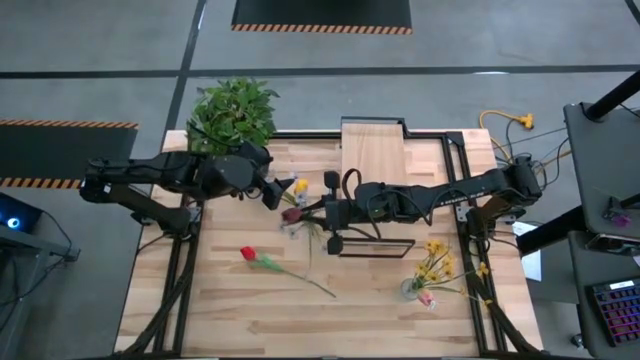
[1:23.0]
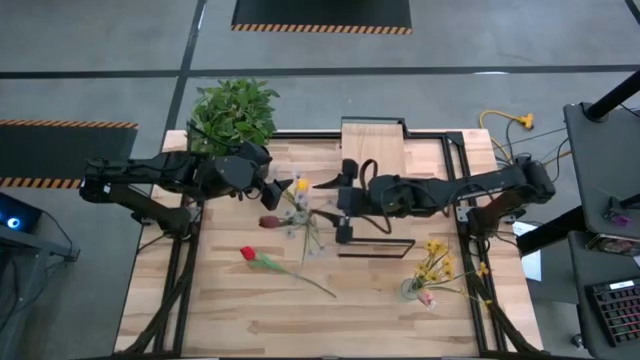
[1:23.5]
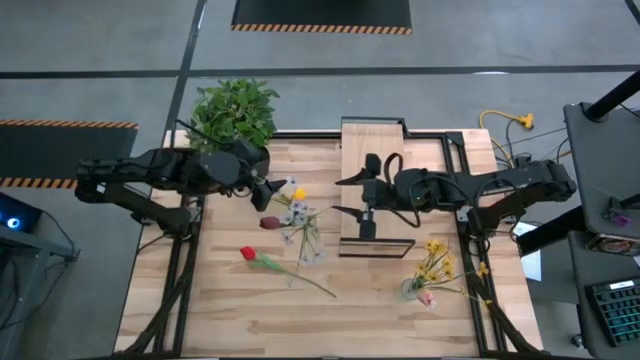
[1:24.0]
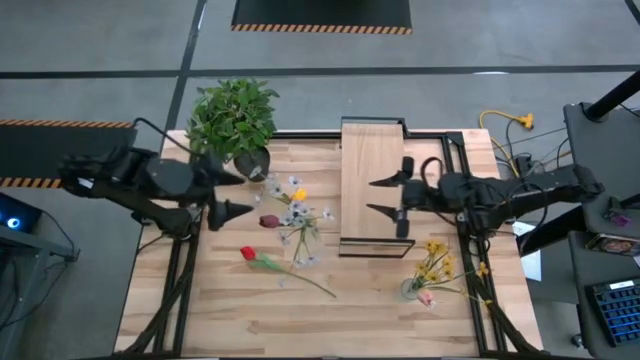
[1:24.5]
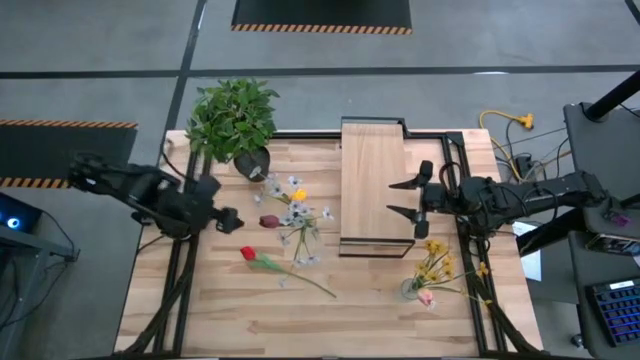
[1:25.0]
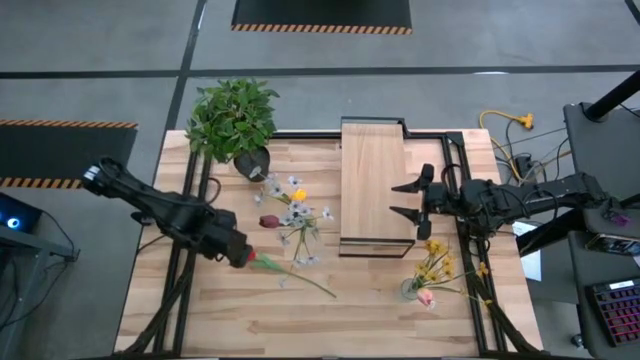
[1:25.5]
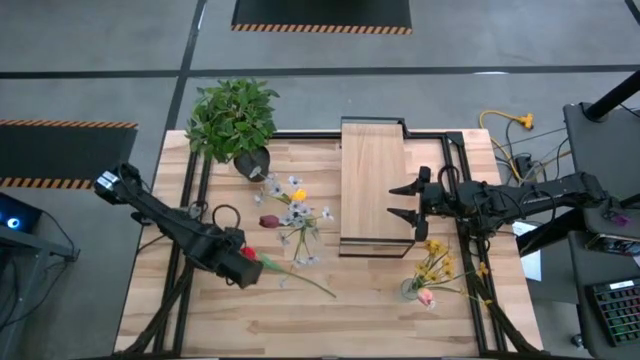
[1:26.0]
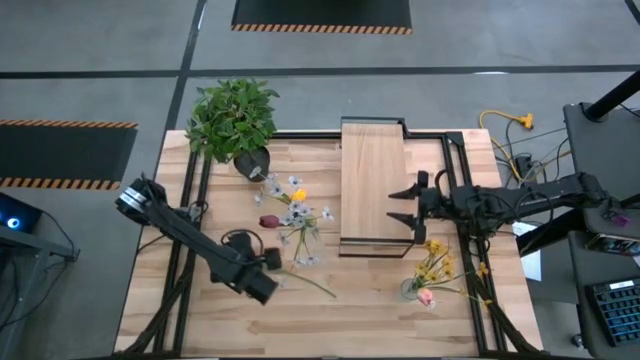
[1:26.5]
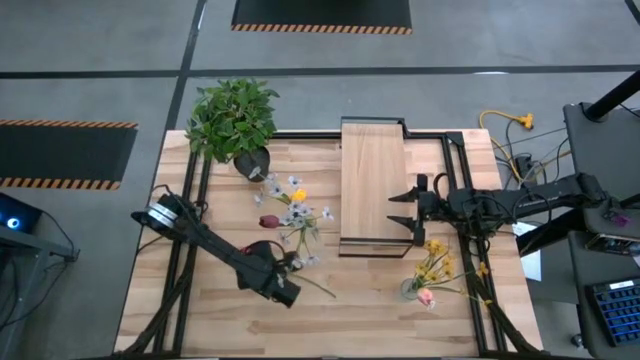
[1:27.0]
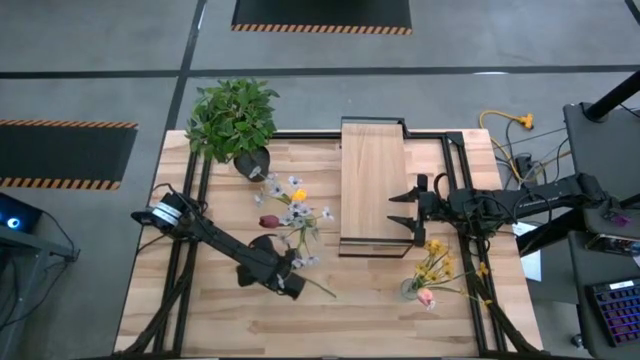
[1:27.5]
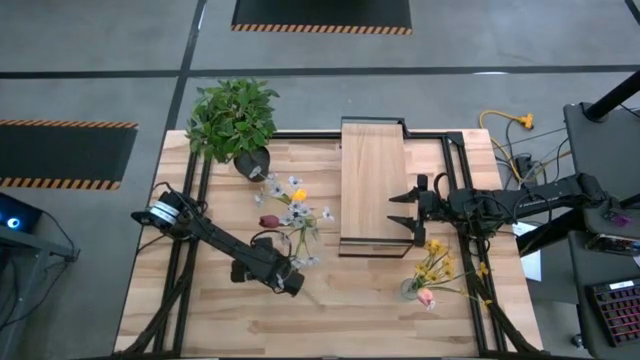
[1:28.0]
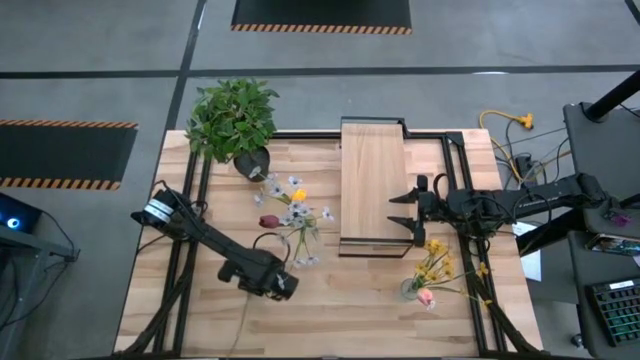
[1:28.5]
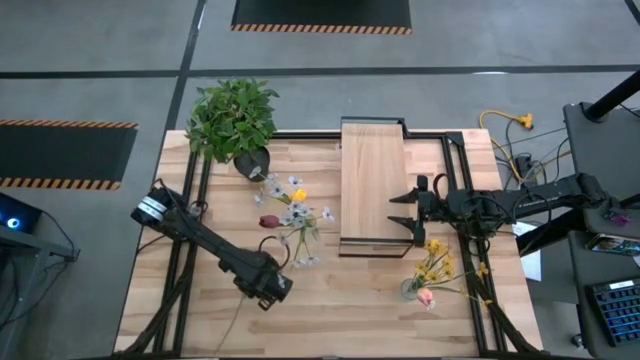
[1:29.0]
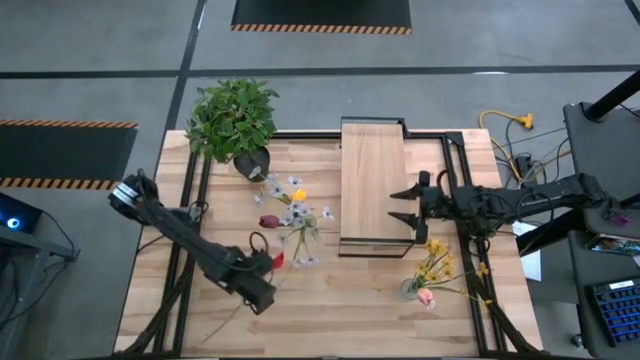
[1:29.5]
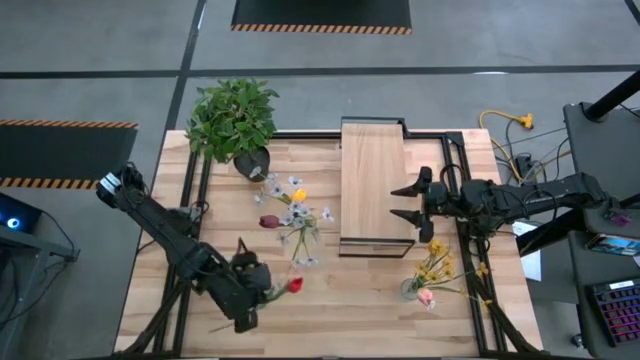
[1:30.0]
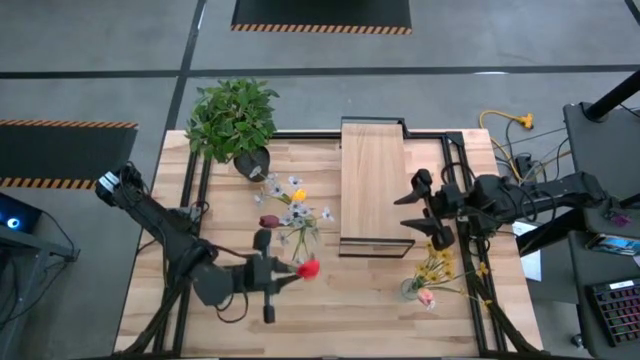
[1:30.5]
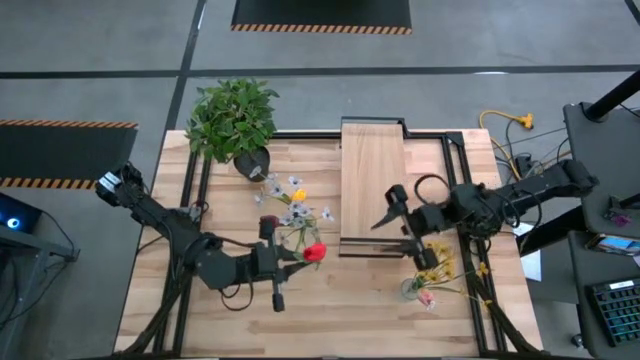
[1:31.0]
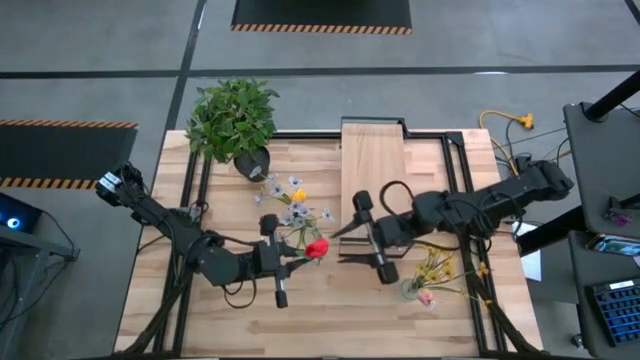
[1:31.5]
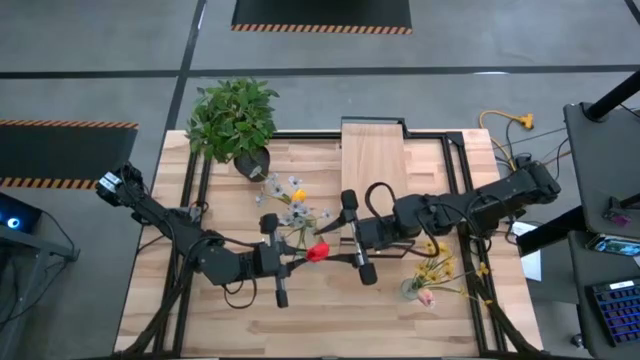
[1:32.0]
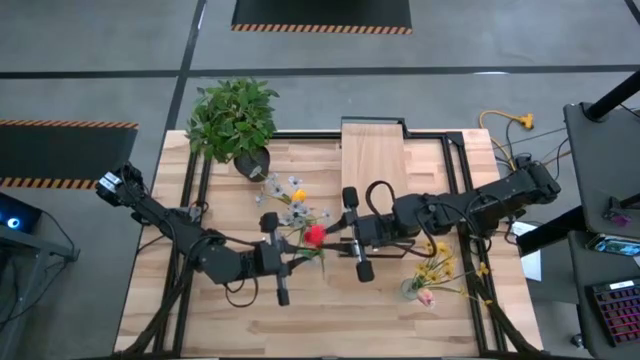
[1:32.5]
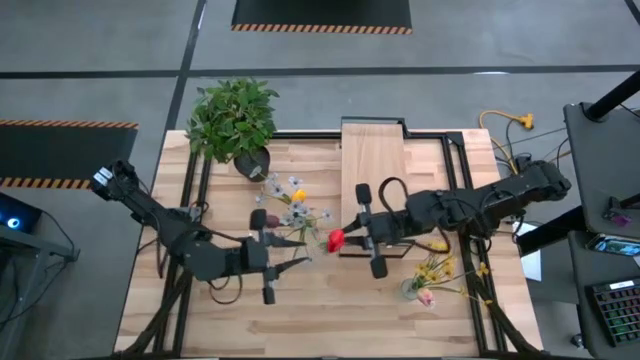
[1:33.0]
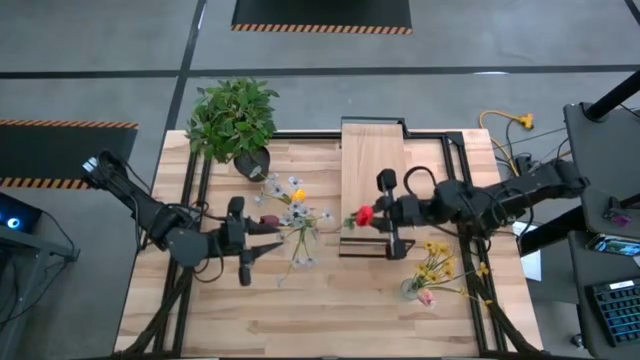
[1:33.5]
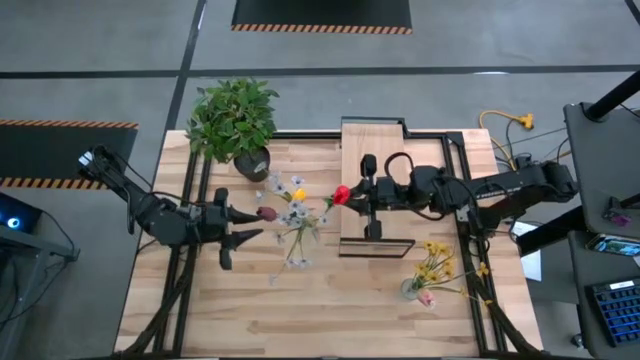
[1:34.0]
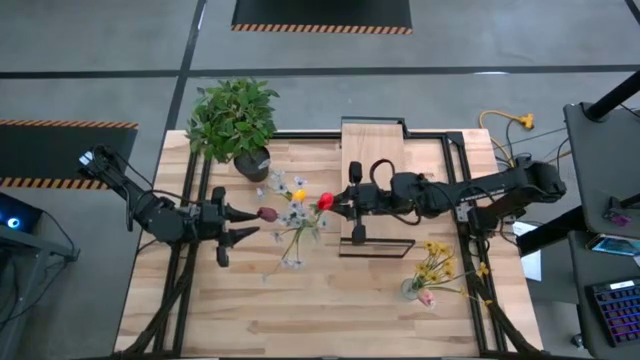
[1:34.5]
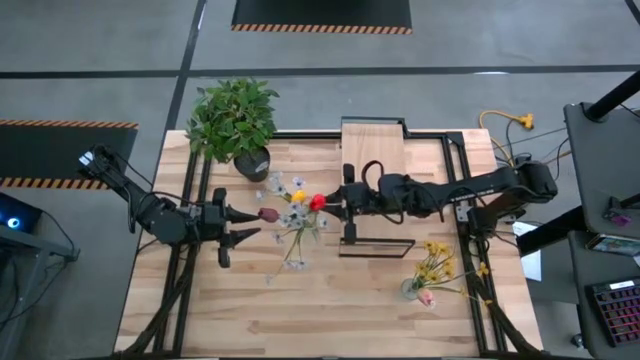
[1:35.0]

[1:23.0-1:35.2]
Task: Pick and place flowers into a vace then onto a shelf
Put the red flower into the left transparent glass vase

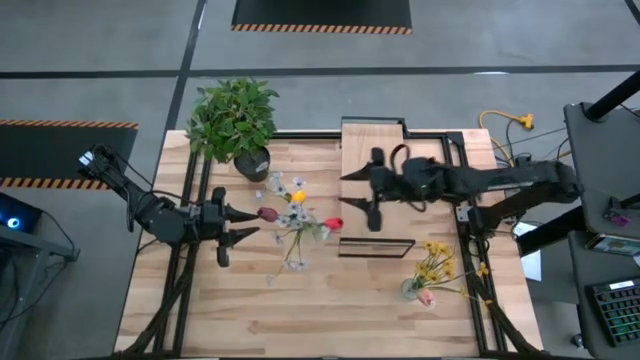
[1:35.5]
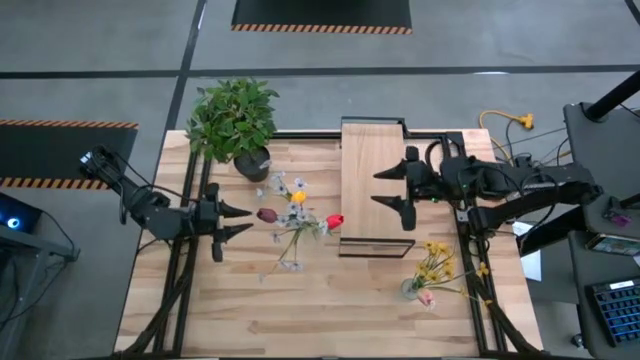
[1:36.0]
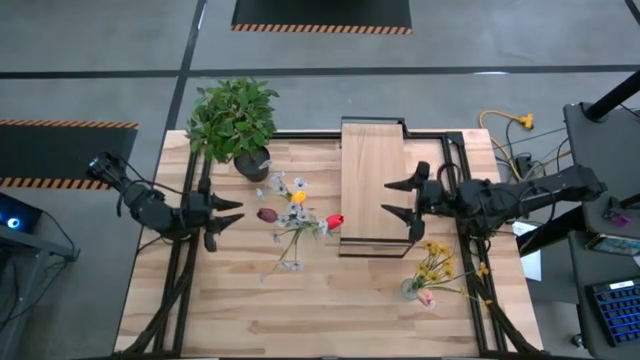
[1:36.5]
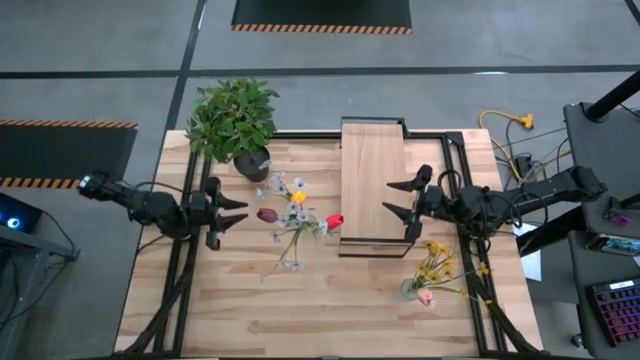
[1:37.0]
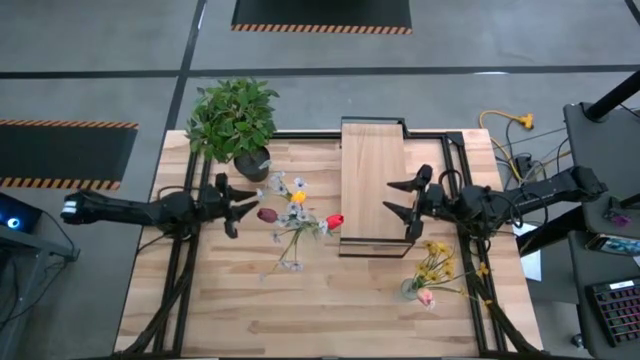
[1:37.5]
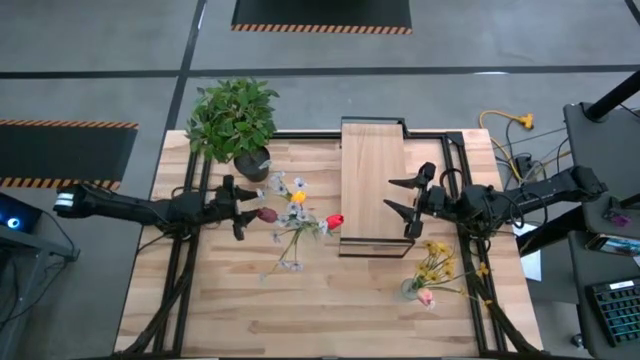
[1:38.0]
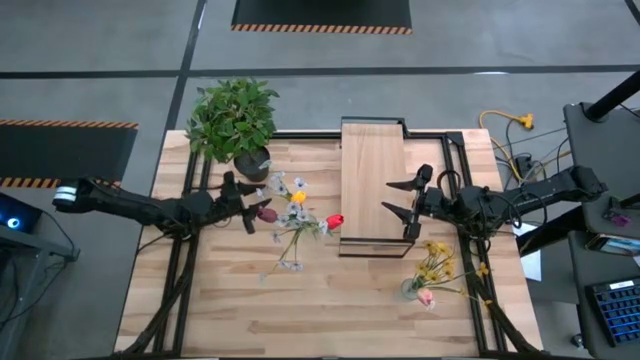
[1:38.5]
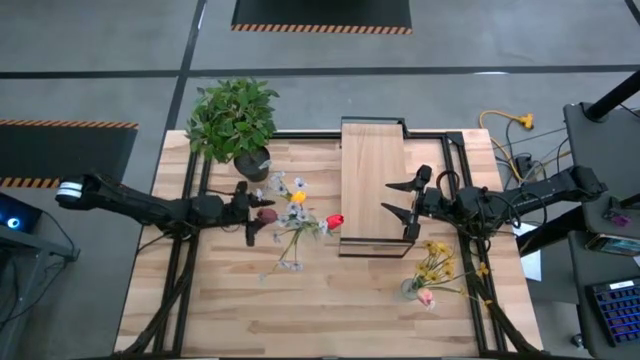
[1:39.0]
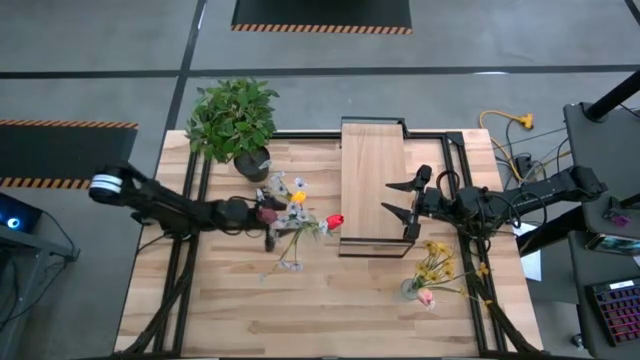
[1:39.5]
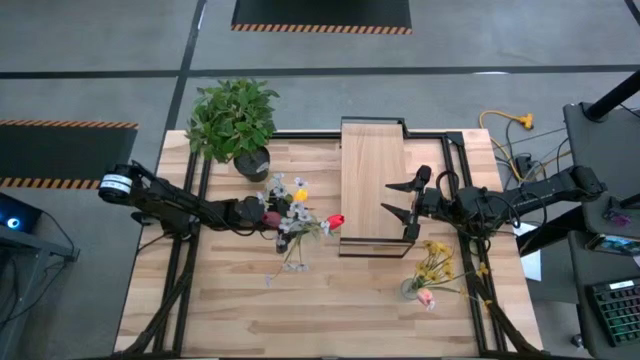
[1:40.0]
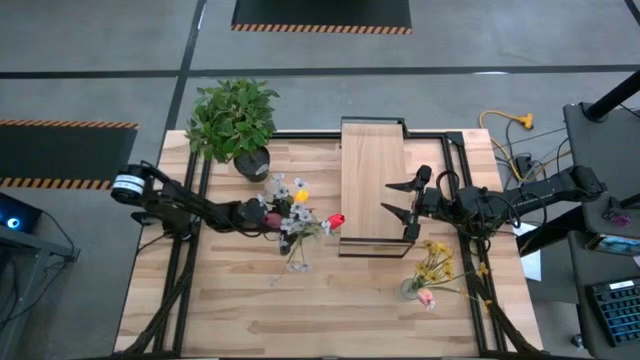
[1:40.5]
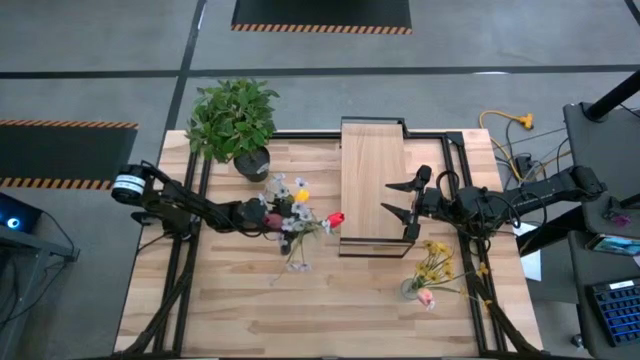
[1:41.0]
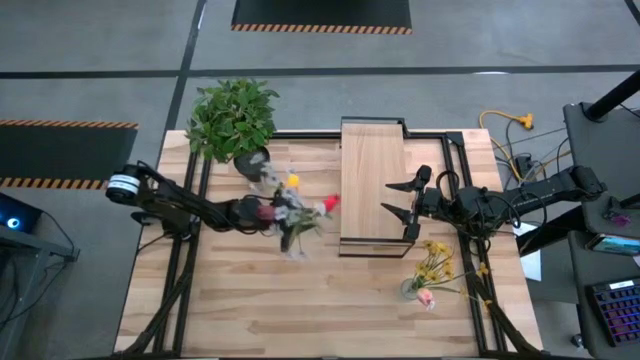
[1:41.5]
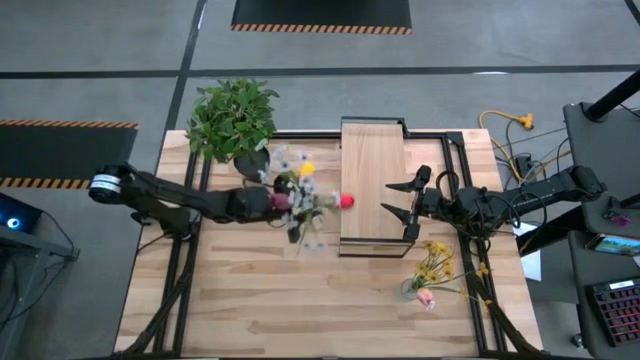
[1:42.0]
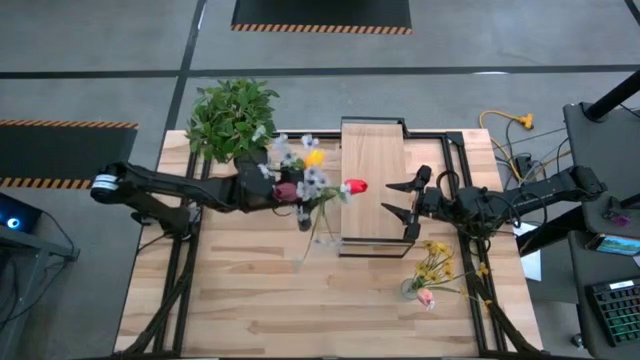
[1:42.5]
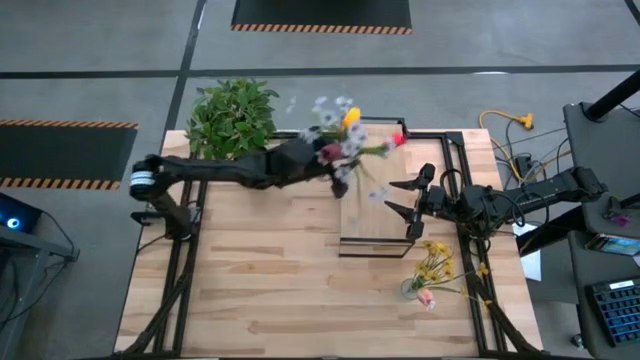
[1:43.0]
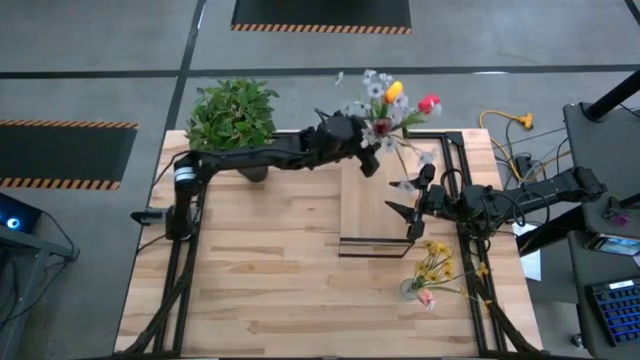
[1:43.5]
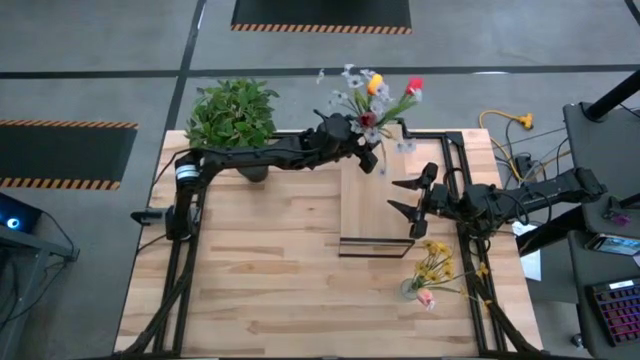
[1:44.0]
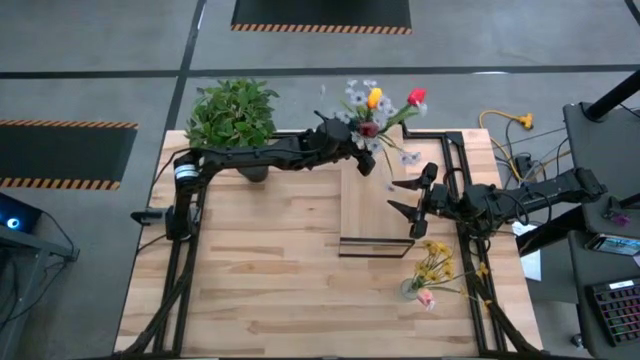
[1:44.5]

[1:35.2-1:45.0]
Put the left transparent vase with tulips and flowers on the shelf
